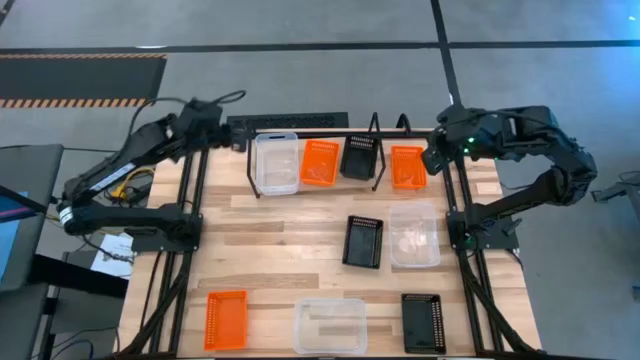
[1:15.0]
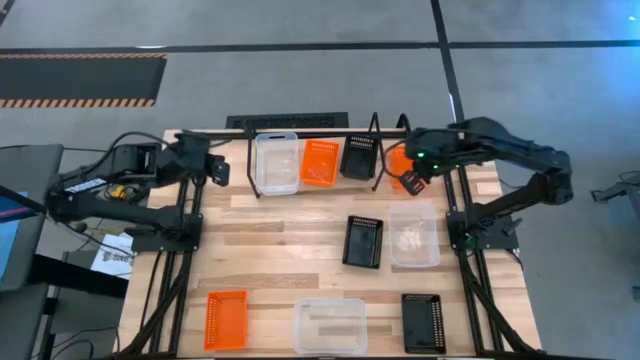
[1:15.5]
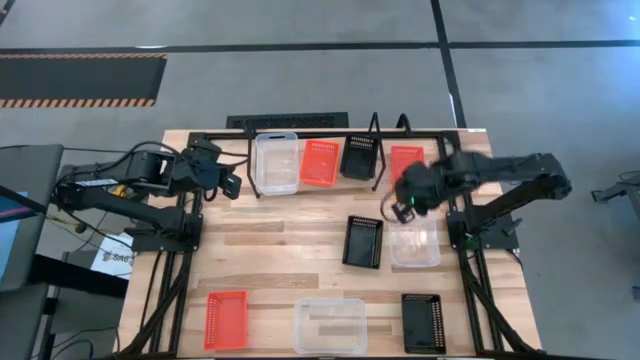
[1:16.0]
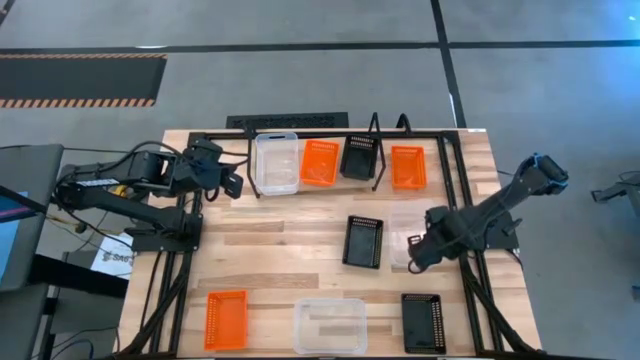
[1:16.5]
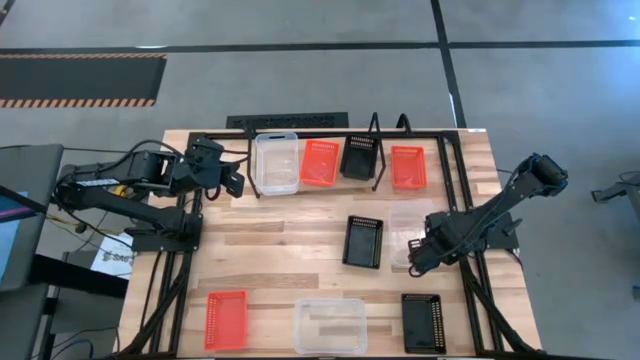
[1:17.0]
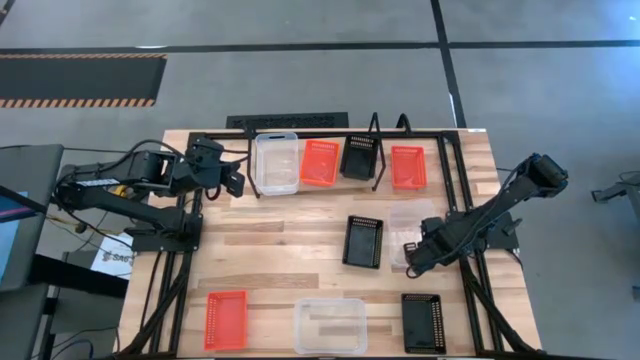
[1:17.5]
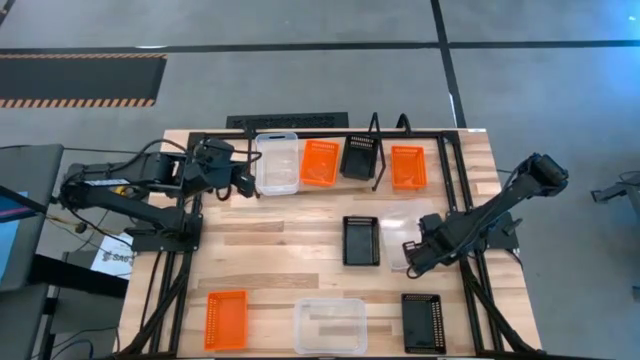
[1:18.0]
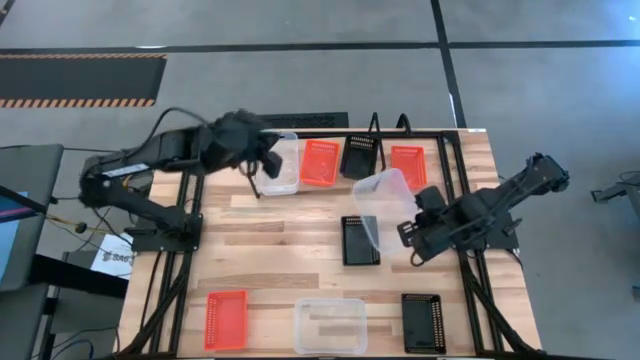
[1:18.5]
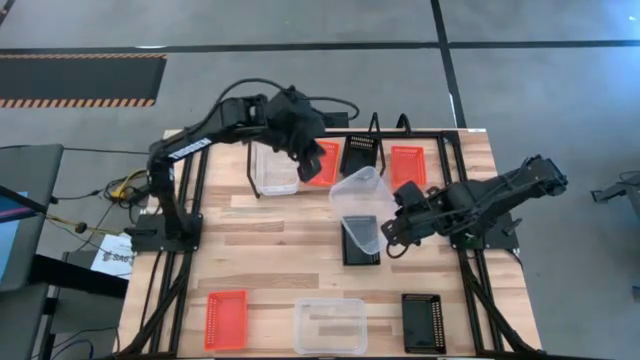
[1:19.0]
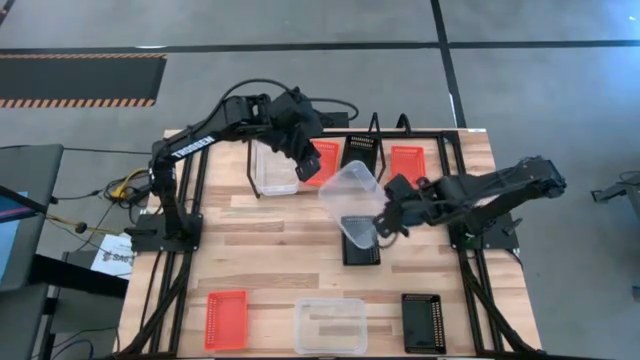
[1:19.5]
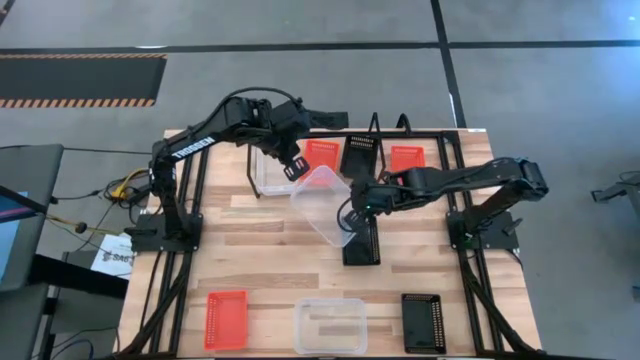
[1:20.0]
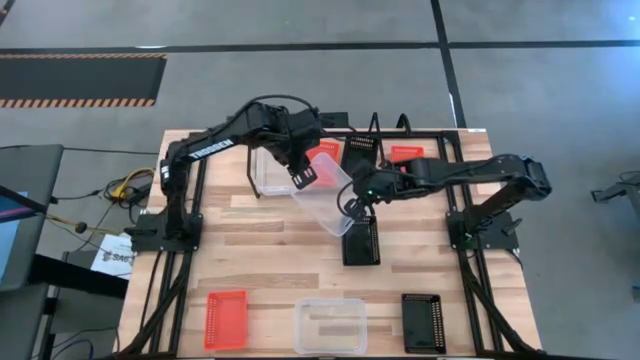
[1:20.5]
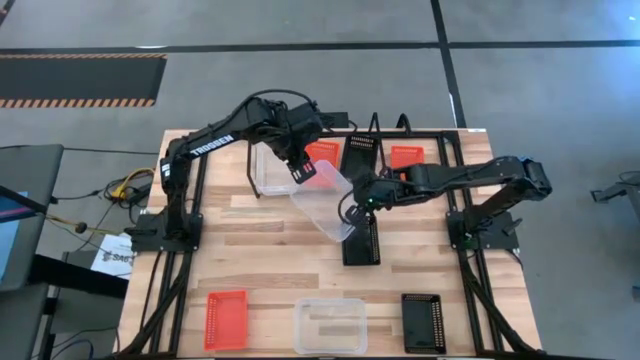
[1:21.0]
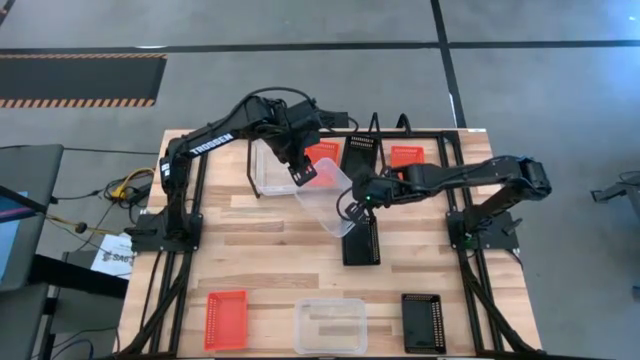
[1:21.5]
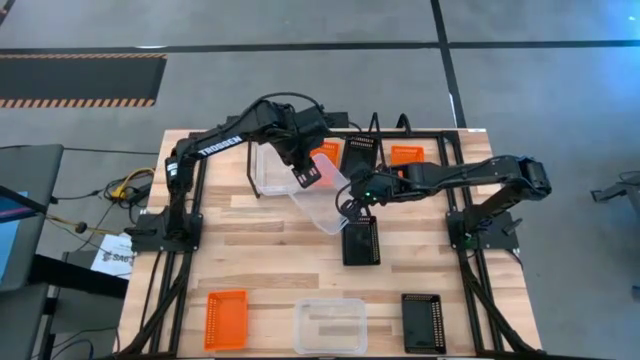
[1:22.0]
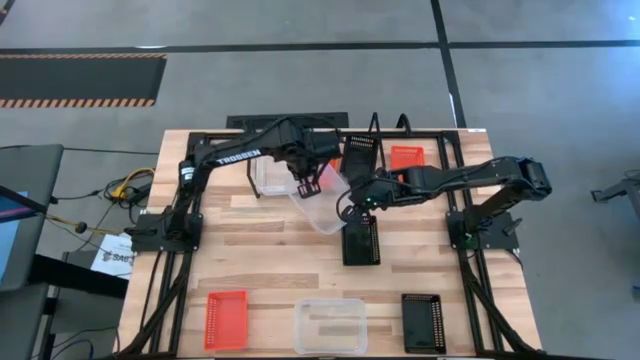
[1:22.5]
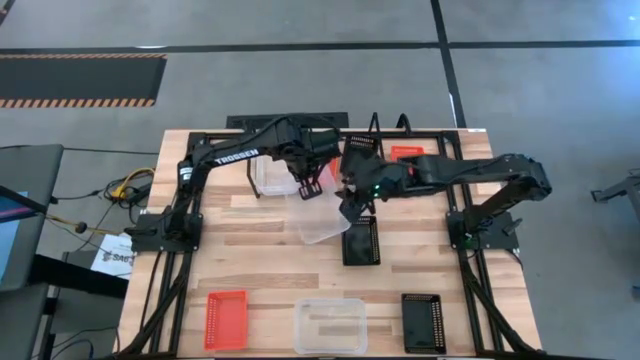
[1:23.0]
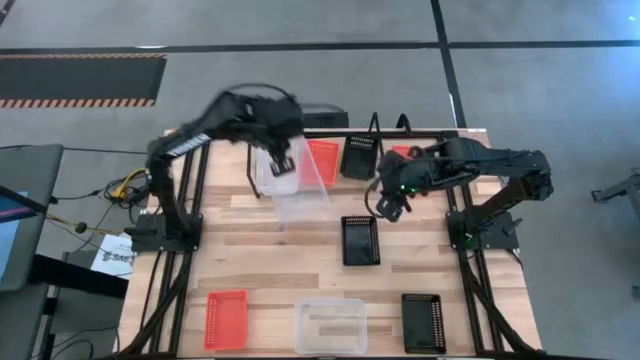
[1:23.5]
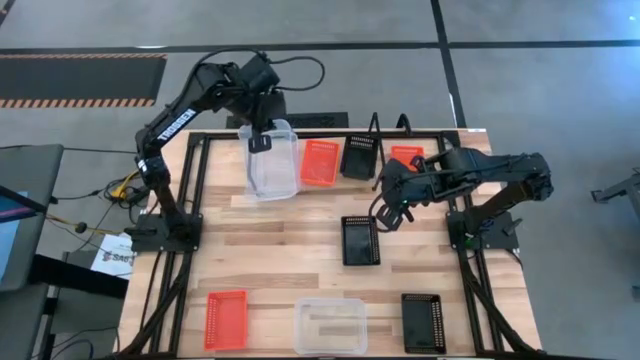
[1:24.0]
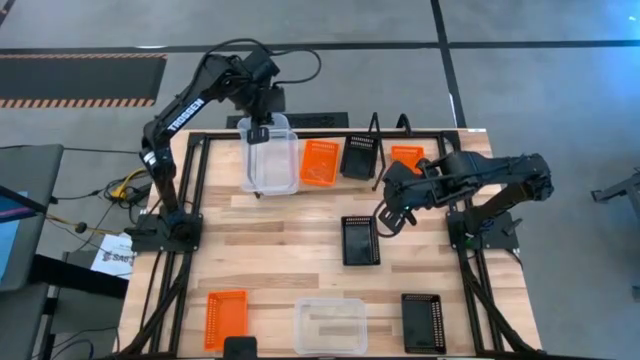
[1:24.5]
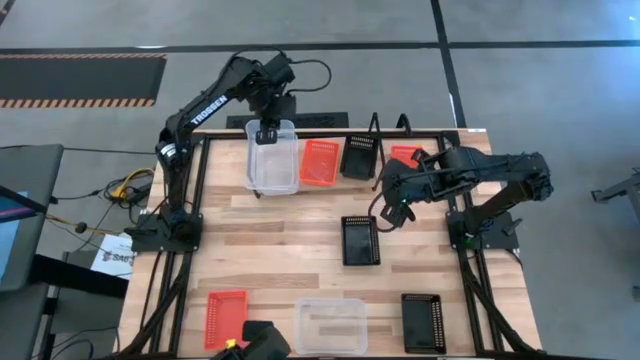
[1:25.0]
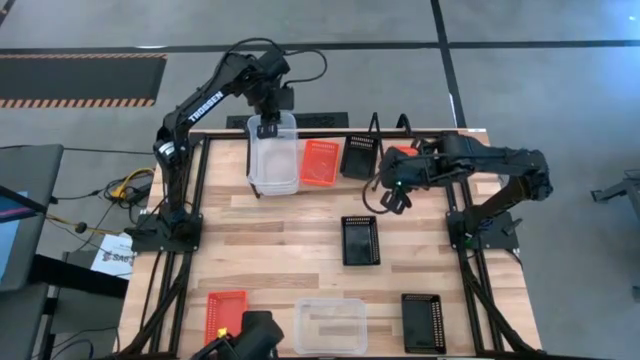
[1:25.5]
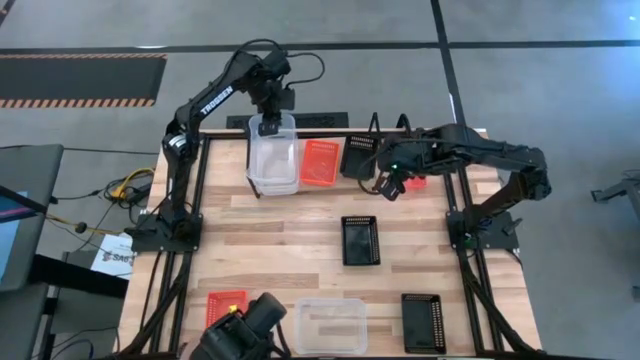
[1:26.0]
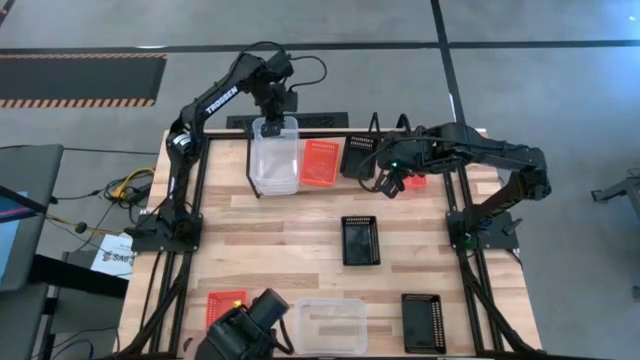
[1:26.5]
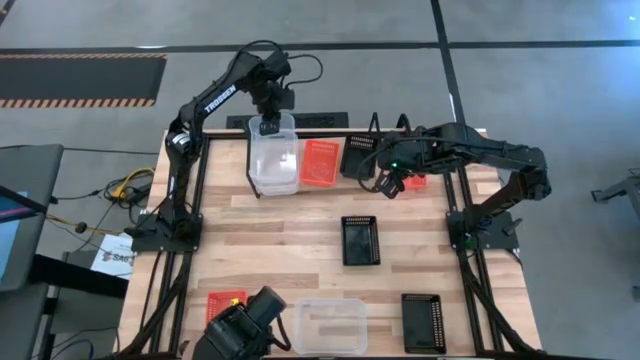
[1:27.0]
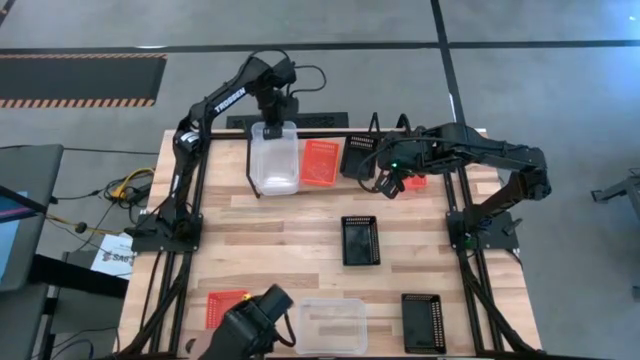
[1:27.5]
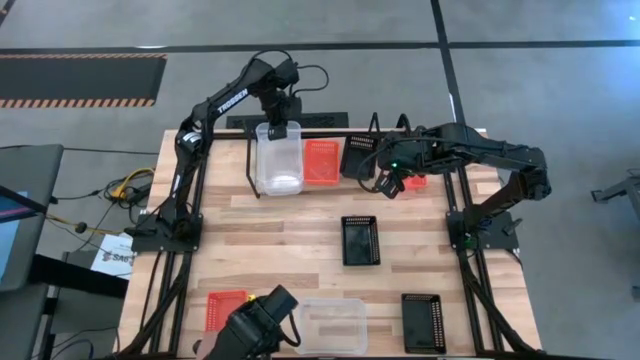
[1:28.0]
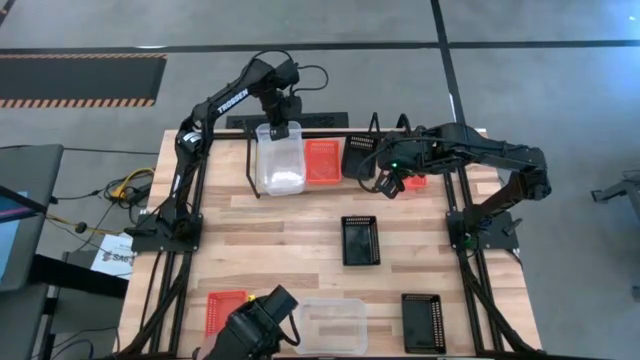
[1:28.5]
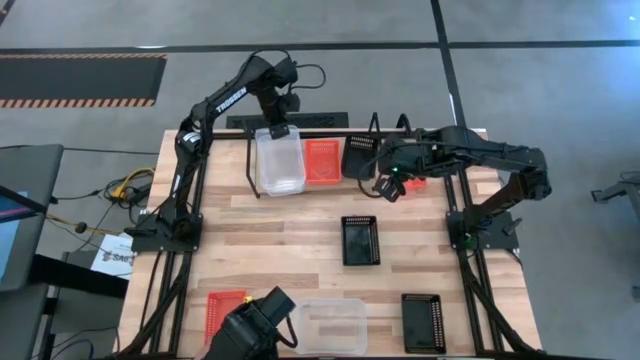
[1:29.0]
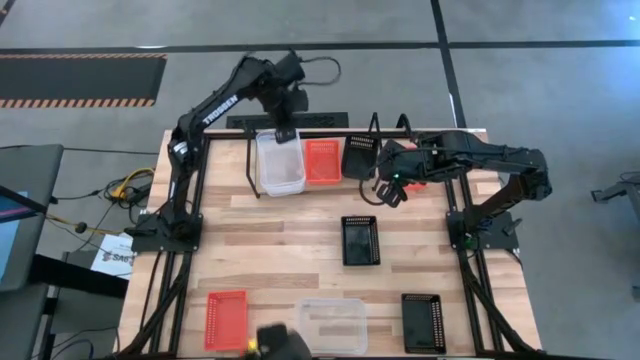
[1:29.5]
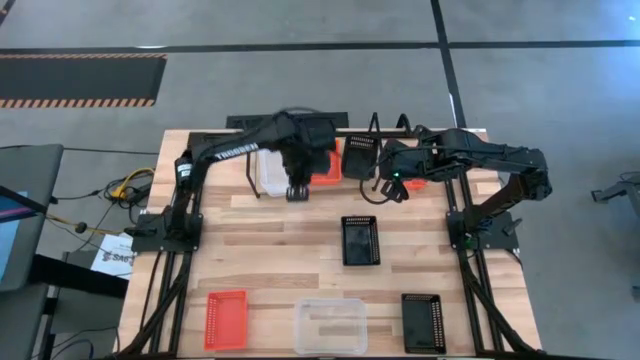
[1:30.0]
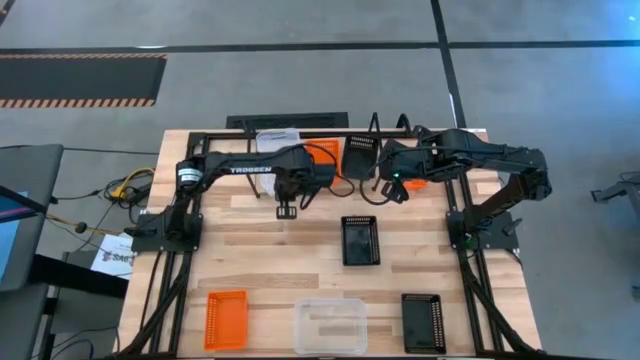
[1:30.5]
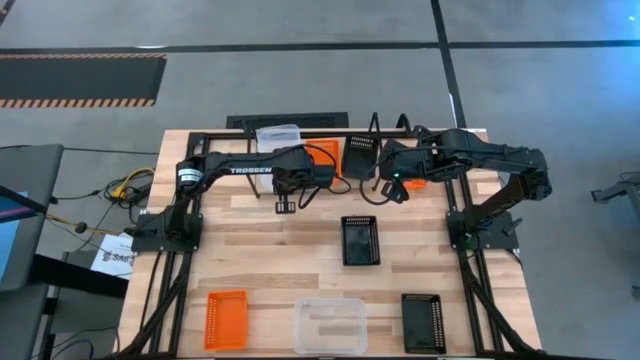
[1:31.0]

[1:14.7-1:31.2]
Task: Stack baskets on shelf by color
Stack the top transparent bin on top of the transparent bin on the shelf

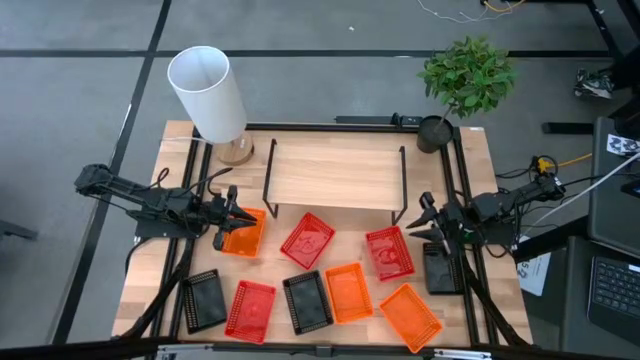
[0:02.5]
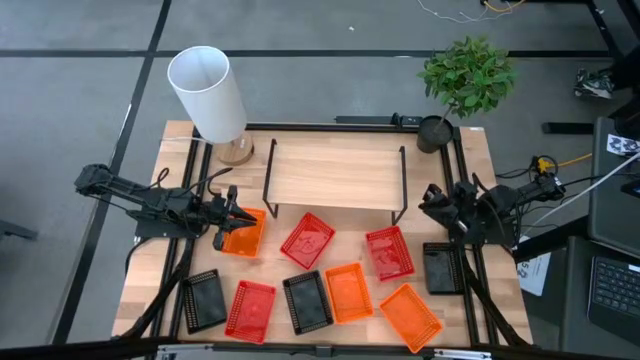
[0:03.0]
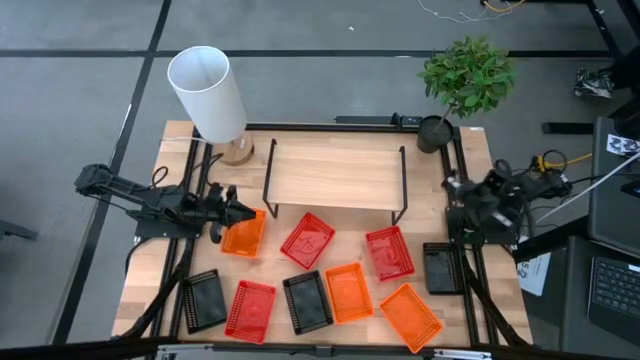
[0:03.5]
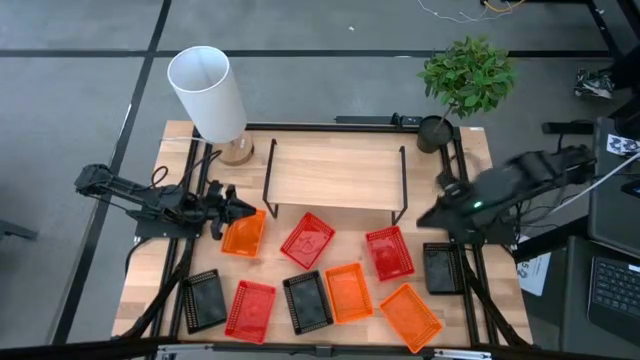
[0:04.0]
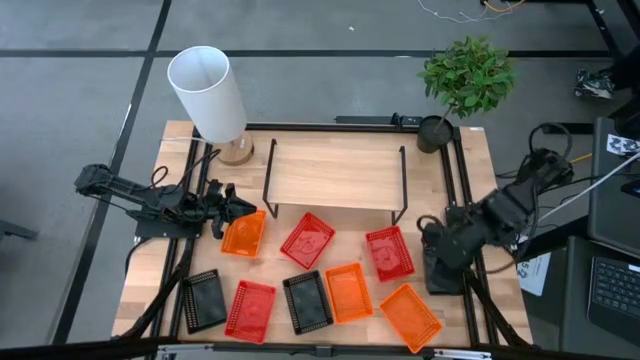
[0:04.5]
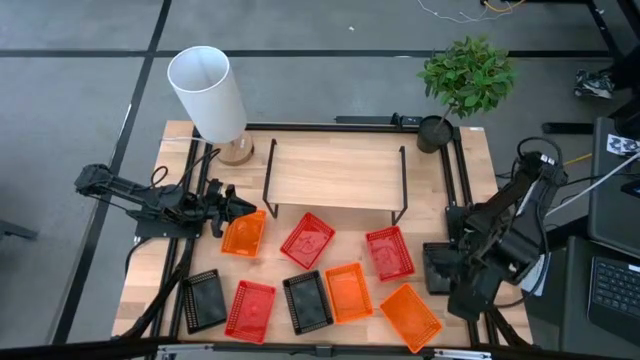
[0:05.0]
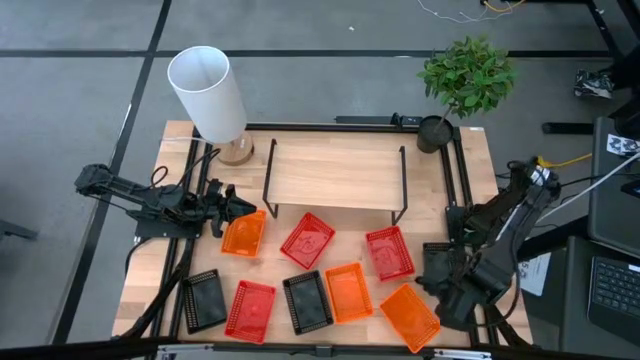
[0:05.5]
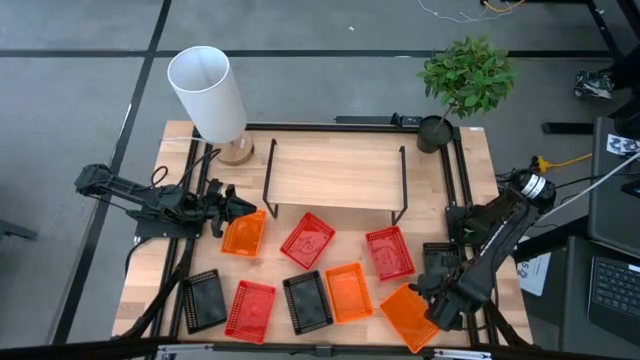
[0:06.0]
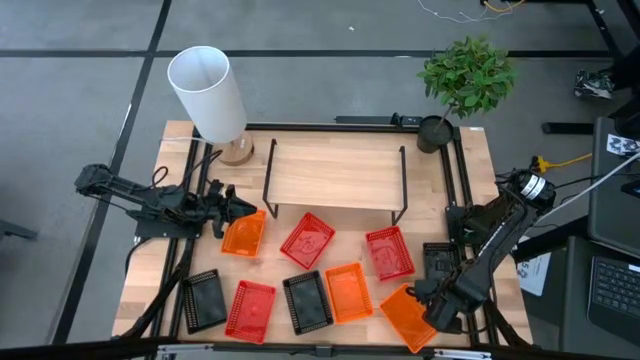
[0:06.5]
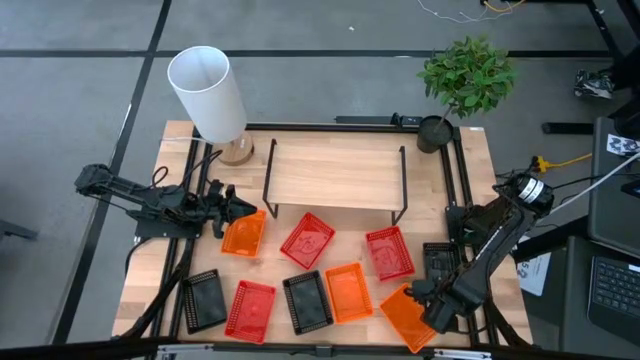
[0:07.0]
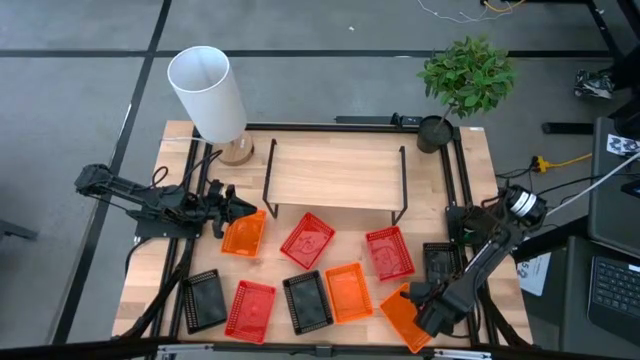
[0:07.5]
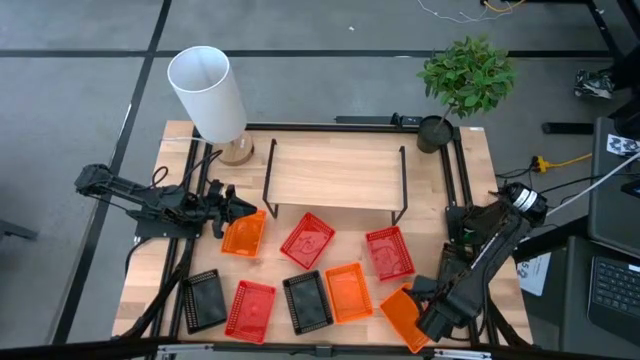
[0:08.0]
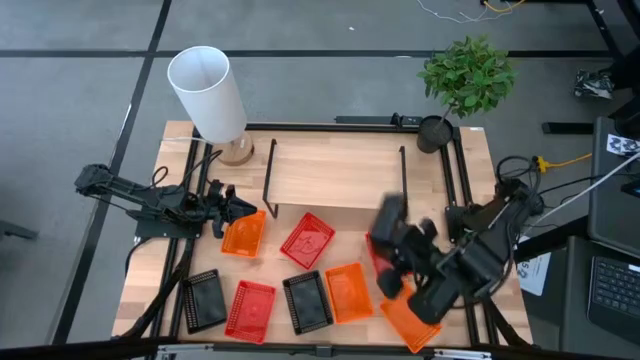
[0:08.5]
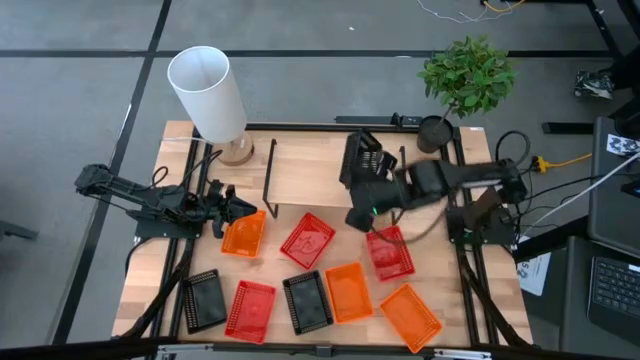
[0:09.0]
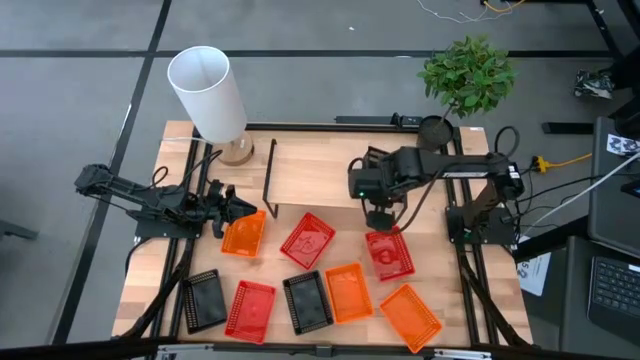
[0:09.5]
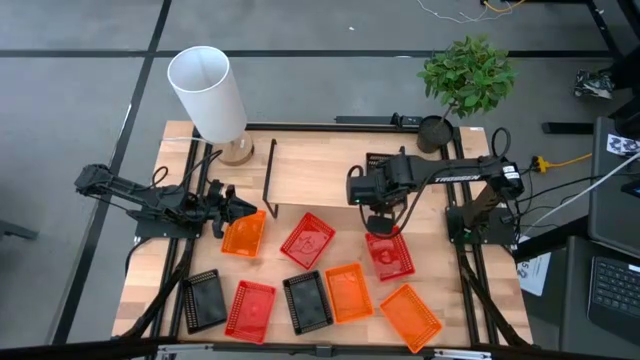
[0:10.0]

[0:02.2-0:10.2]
Task: Stack baskets on shelf by color
Put the right black bin on the shelf
